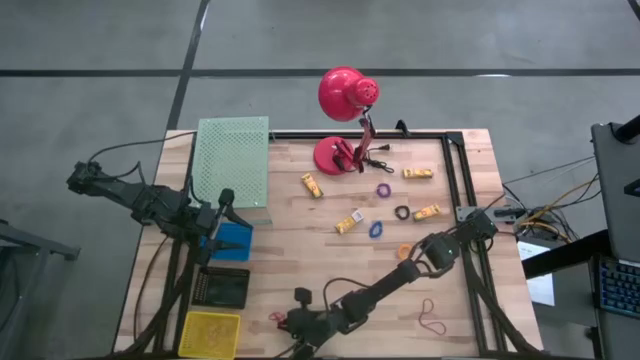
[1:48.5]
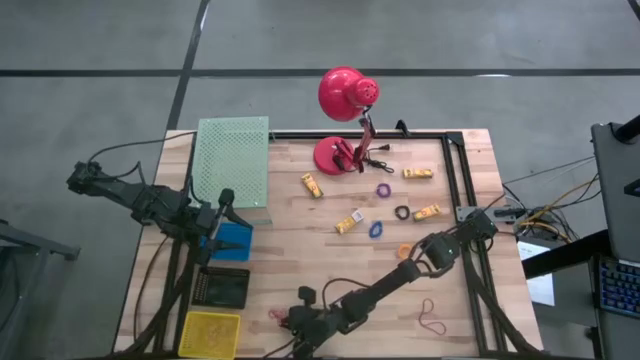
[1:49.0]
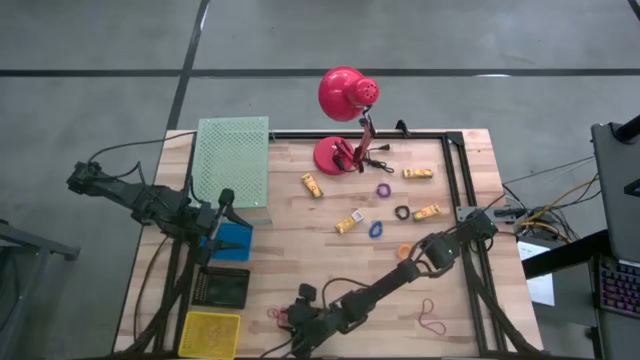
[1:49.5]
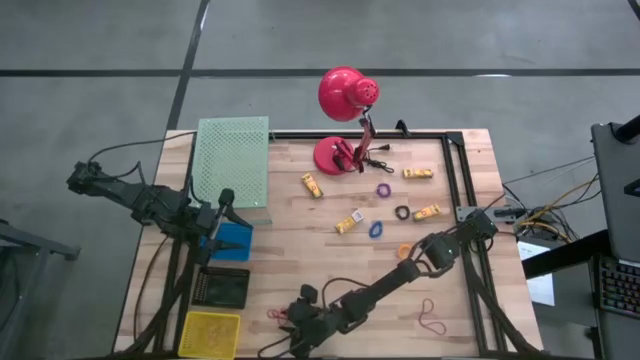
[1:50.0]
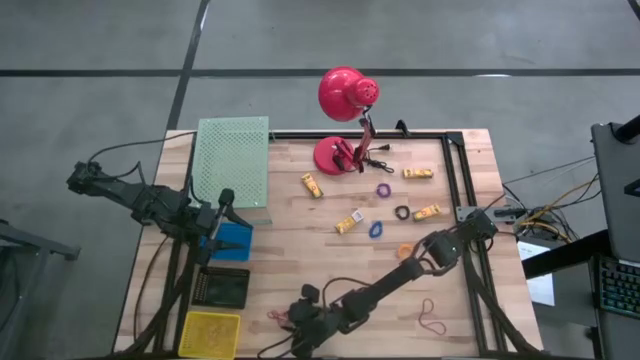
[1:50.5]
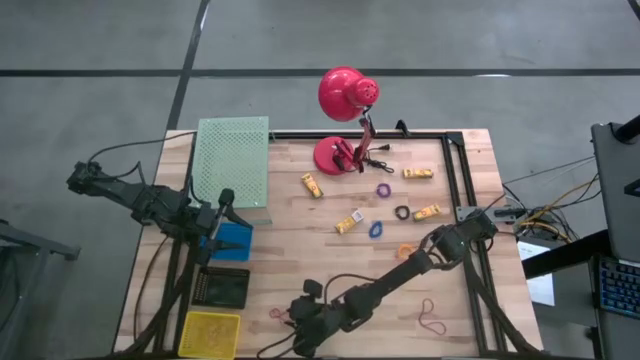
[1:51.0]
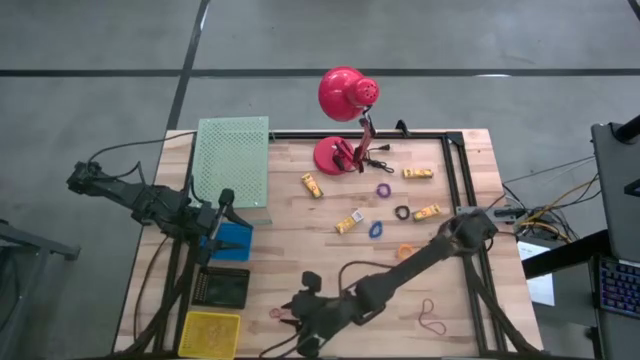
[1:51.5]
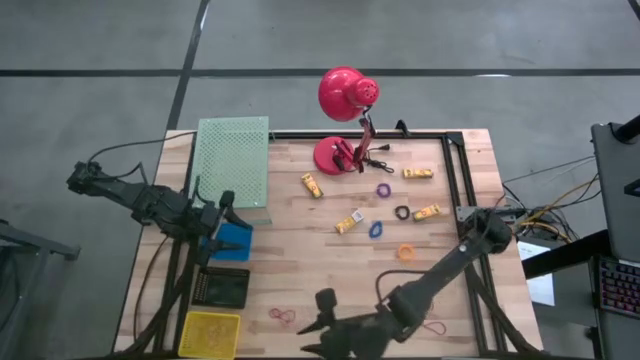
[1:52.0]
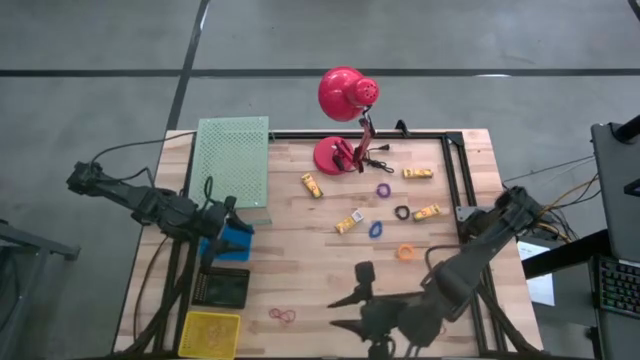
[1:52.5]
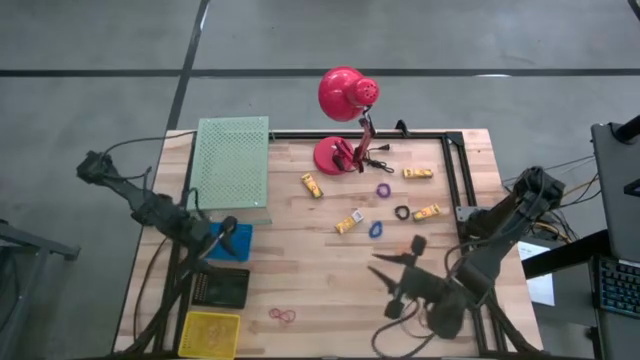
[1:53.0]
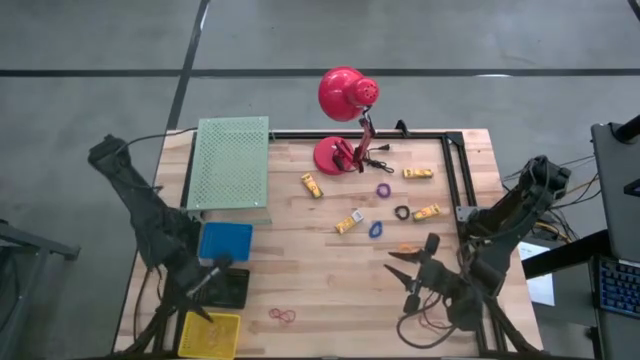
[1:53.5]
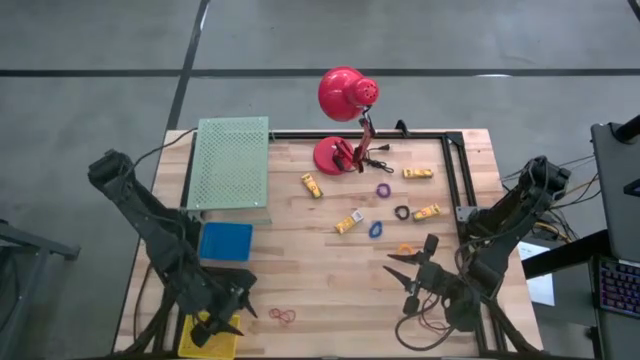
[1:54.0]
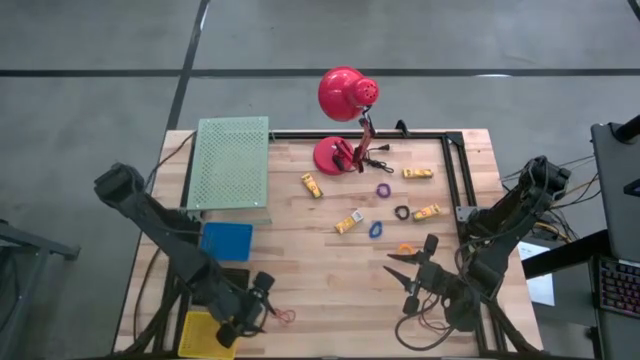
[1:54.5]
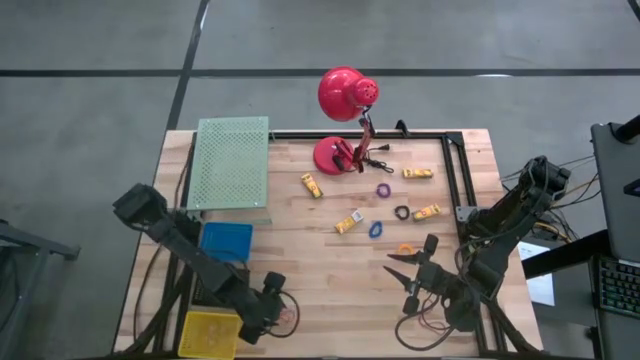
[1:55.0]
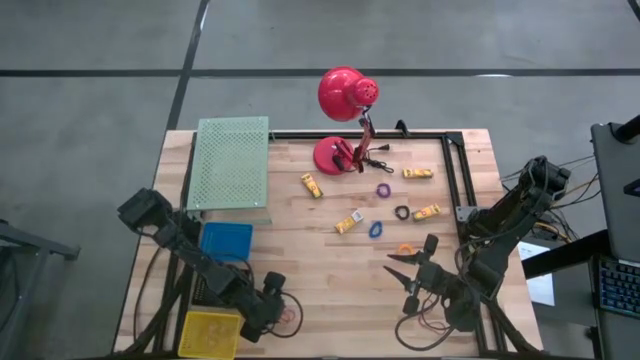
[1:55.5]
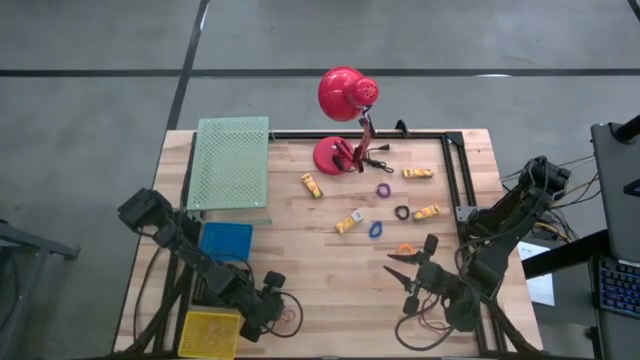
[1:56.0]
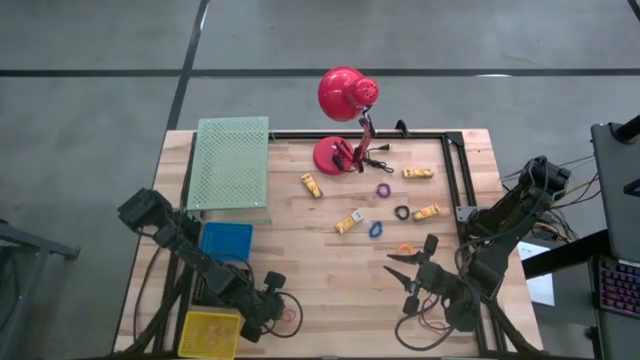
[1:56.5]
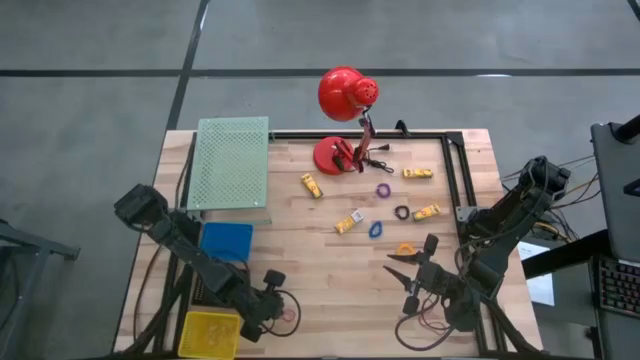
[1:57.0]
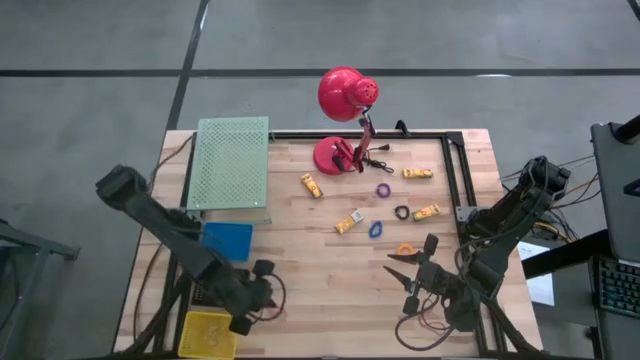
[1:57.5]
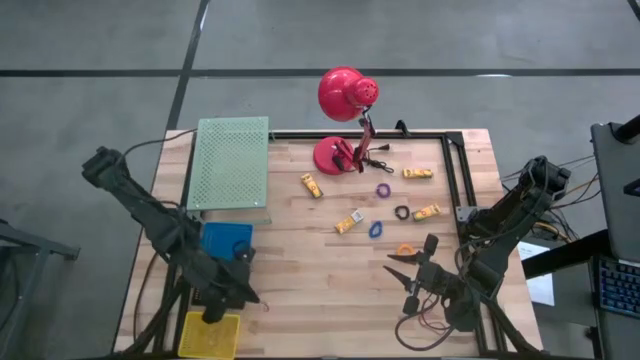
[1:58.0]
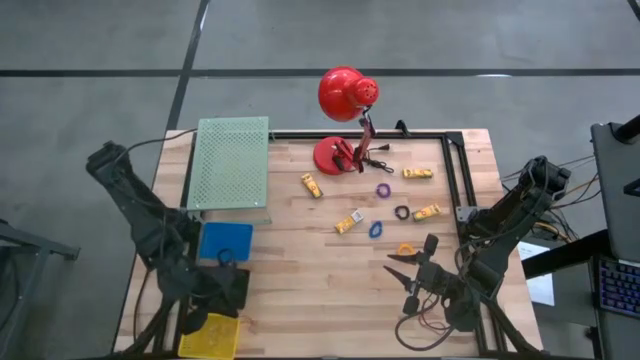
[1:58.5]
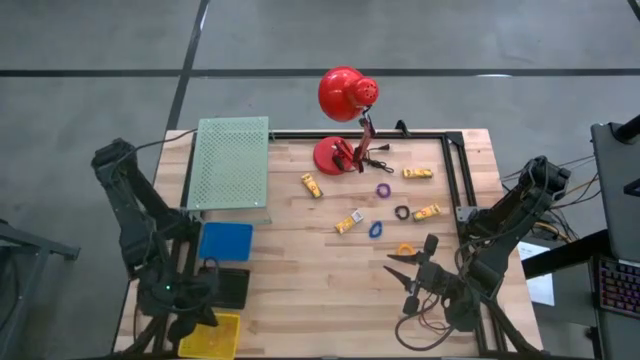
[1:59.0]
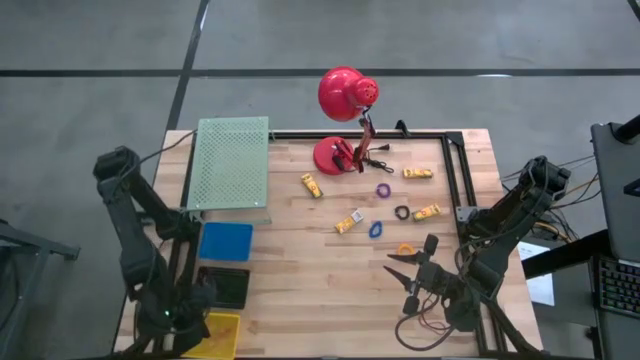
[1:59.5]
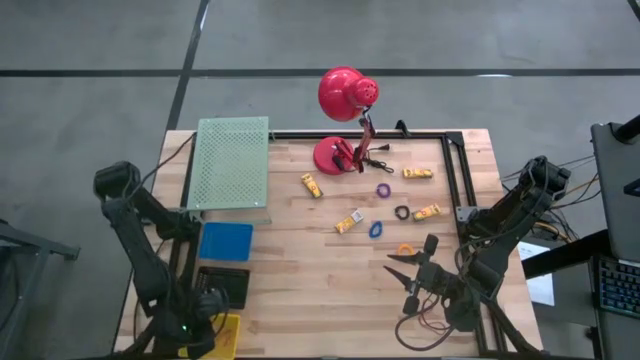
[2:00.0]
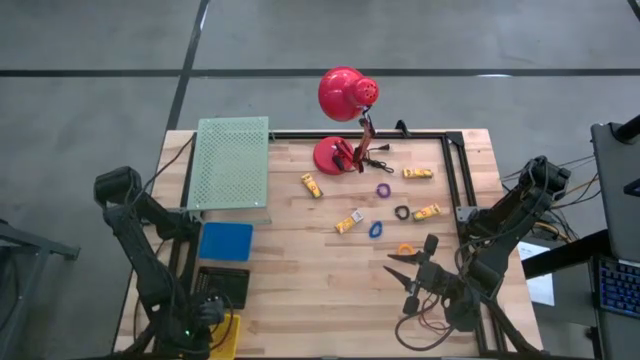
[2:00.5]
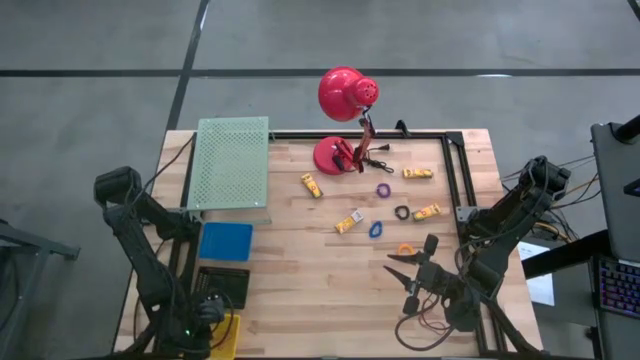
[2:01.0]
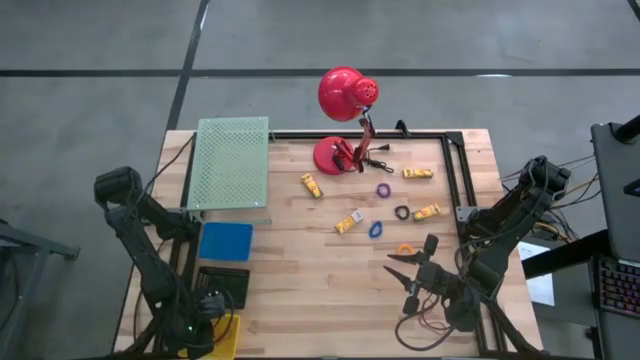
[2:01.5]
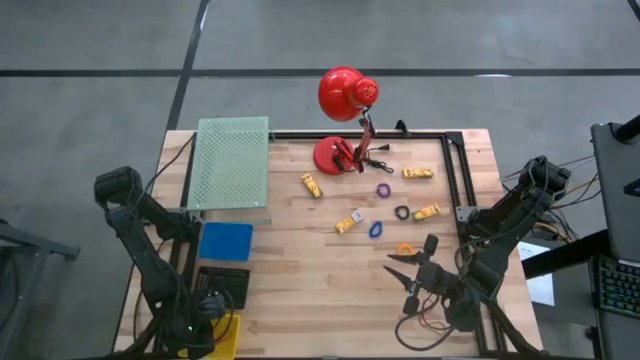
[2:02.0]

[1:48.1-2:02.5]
Task: Pick & Place Office Desk Supplies
Put the top red rubber band into the yellow bin

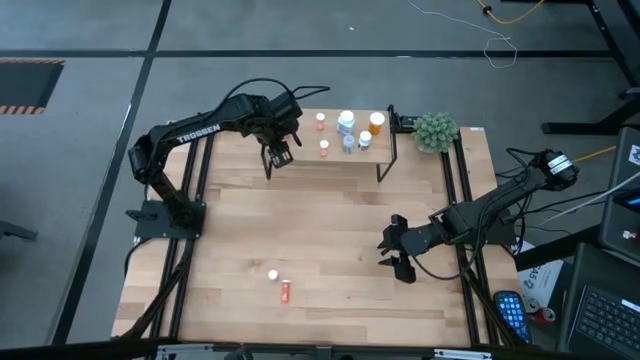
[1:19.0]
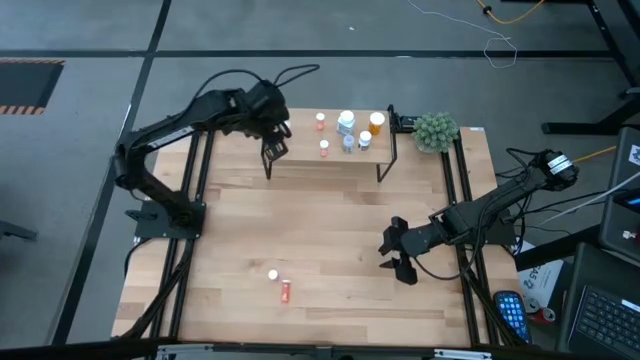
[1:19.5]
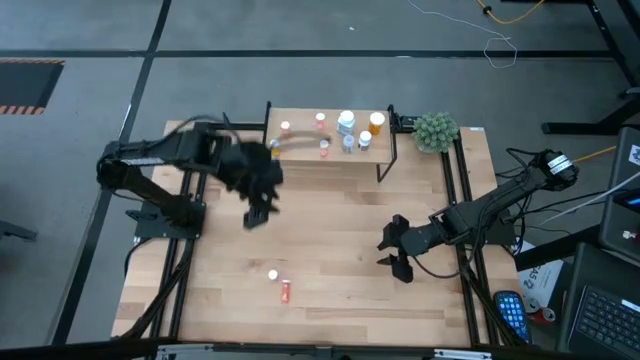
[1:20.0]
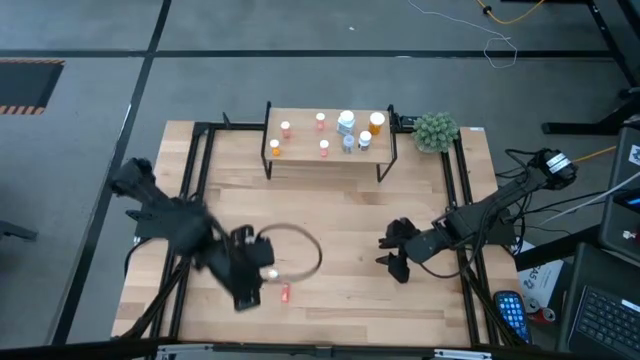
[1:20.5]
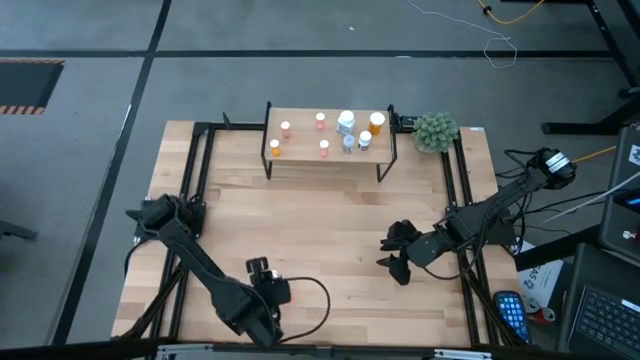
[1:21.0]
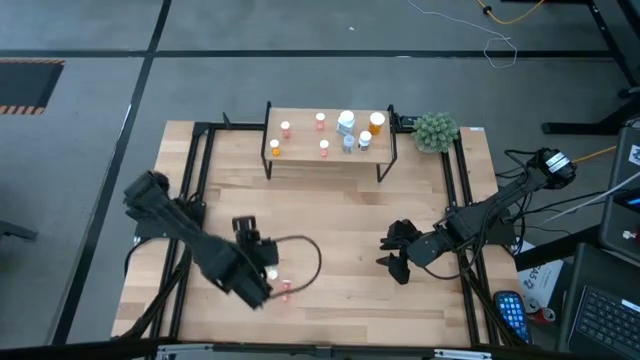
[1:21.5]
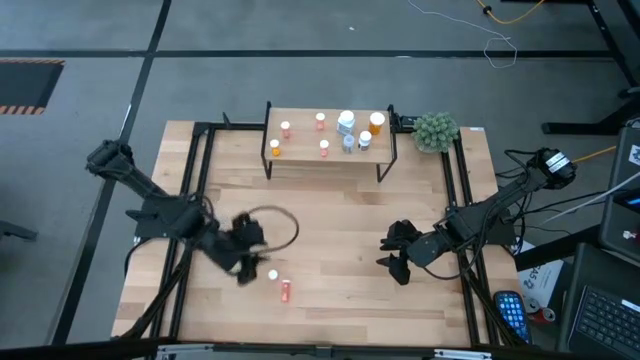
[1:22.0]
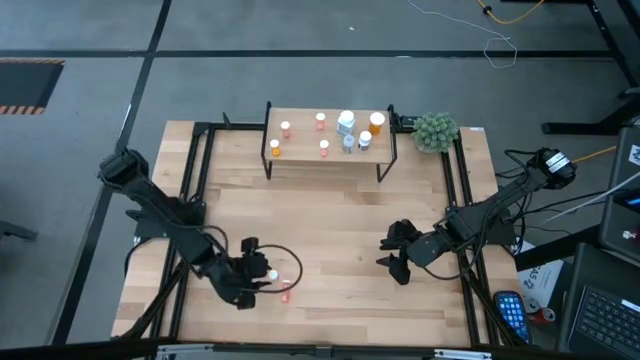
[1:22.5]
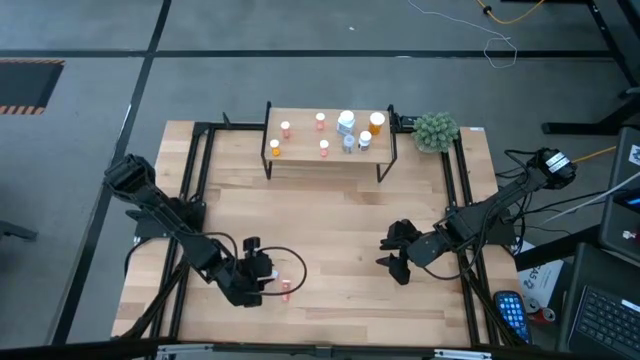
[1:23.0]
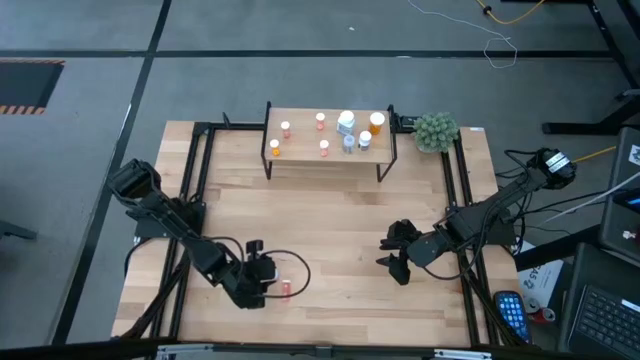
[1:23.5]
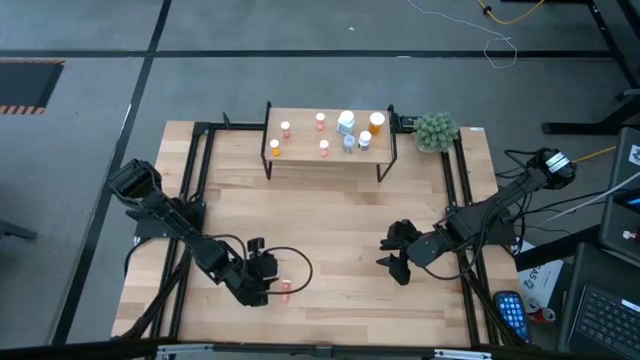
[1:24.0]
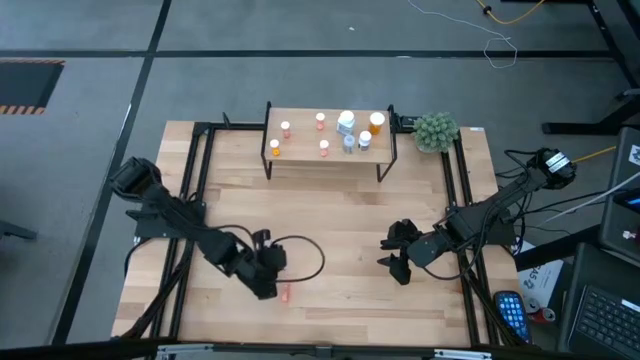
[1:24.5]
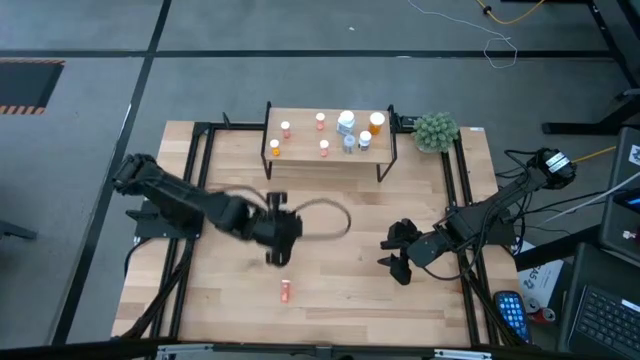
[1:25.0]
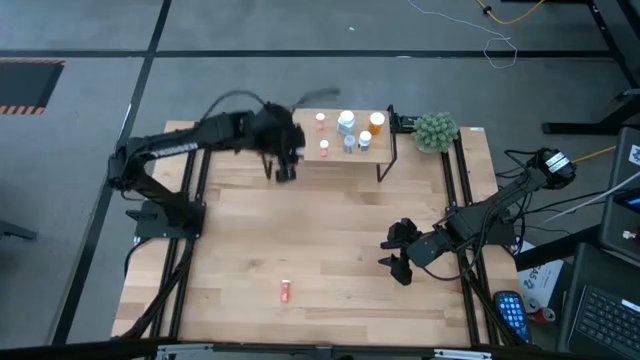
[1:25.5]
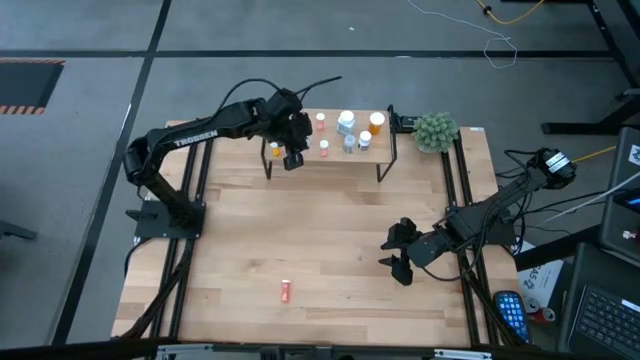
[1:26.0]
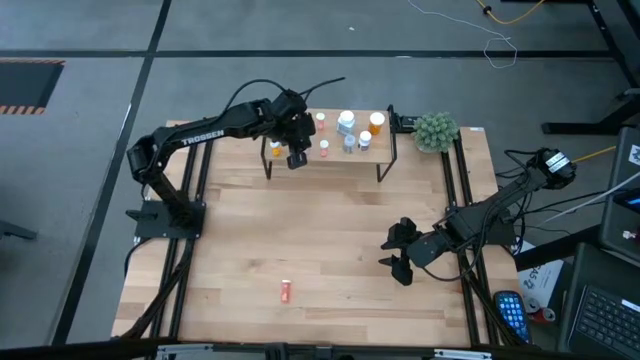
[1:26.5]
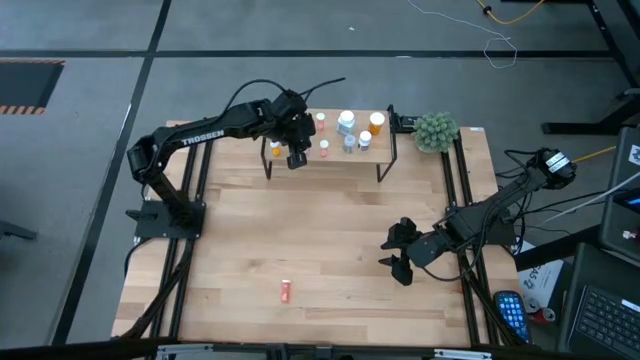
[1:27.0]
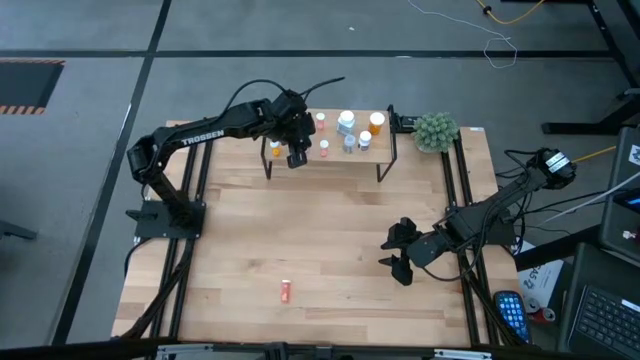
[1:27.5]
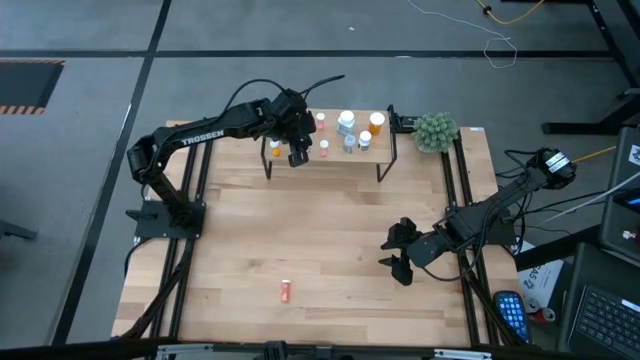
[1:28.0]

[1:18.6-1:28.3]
Task: Pick and place medicine bottles onto shelf by color
Put the small pink pill bottle on the shelf
